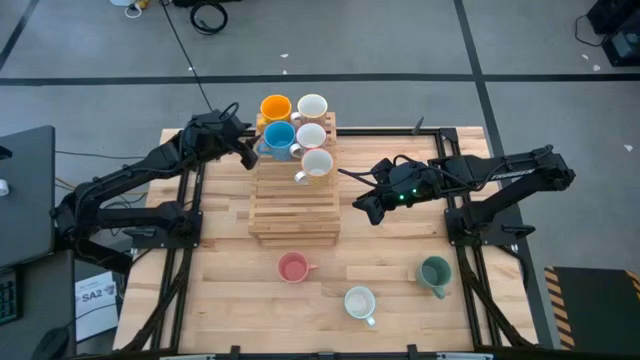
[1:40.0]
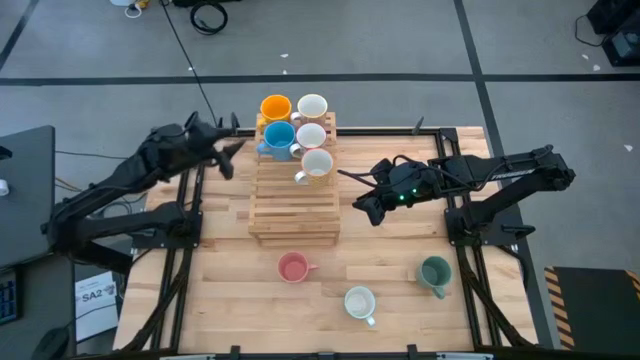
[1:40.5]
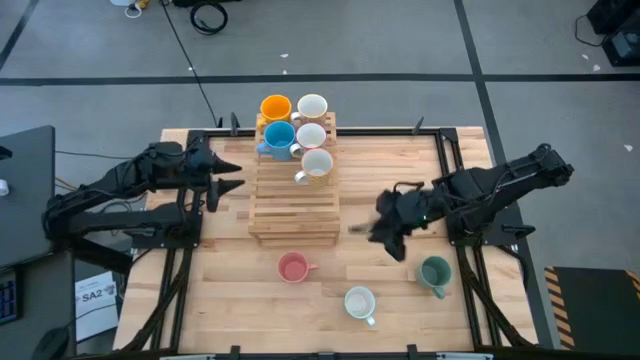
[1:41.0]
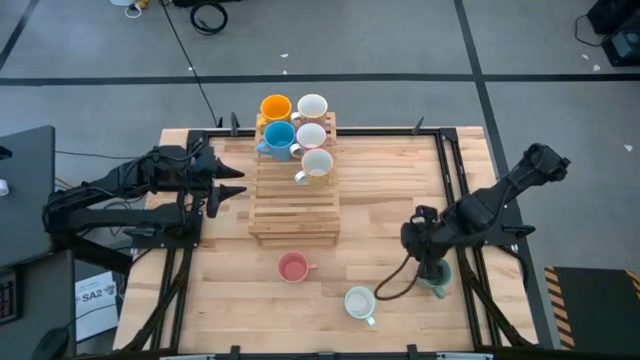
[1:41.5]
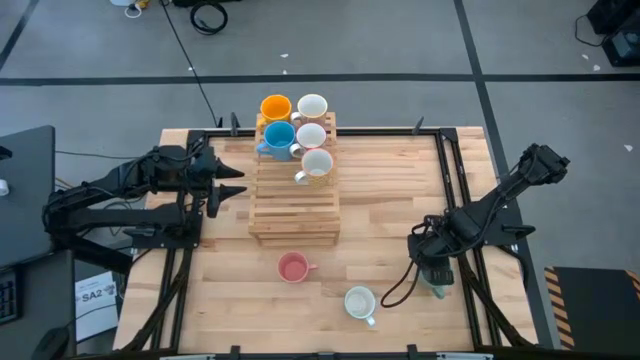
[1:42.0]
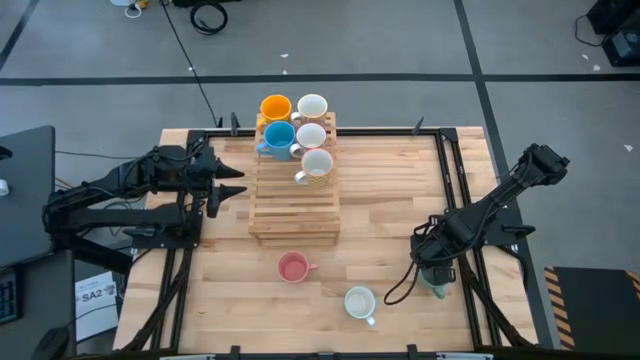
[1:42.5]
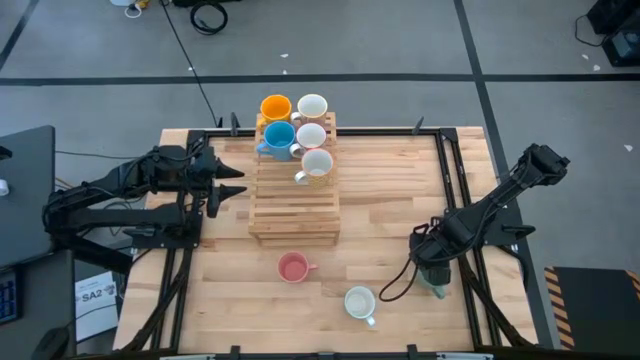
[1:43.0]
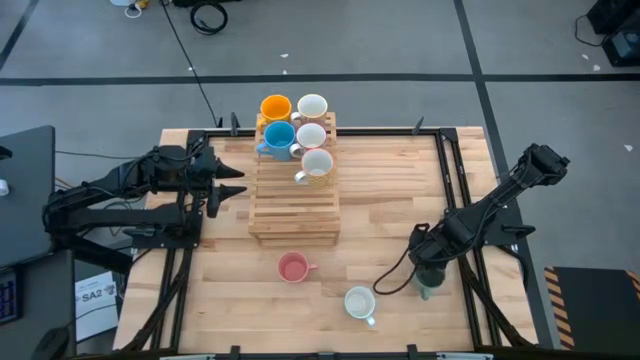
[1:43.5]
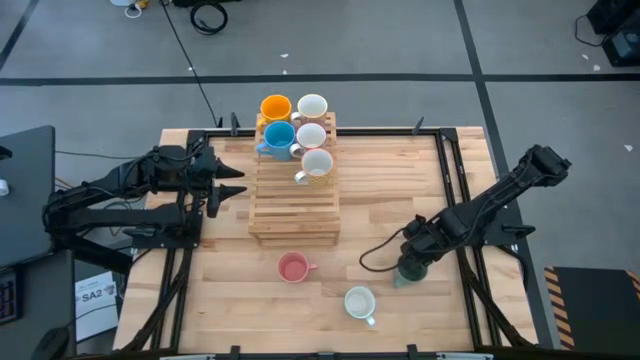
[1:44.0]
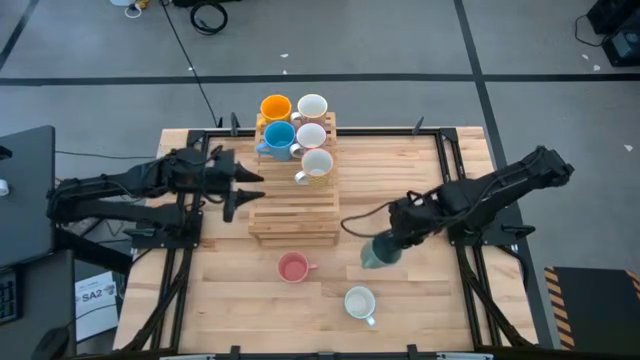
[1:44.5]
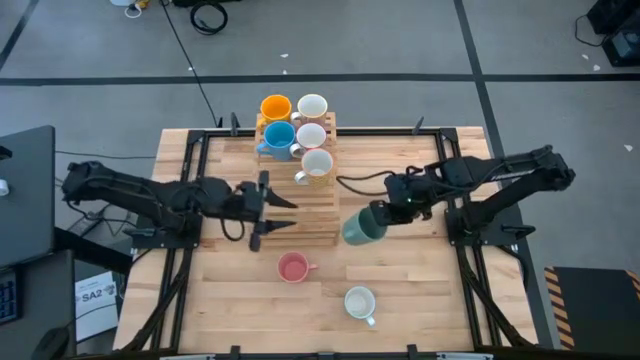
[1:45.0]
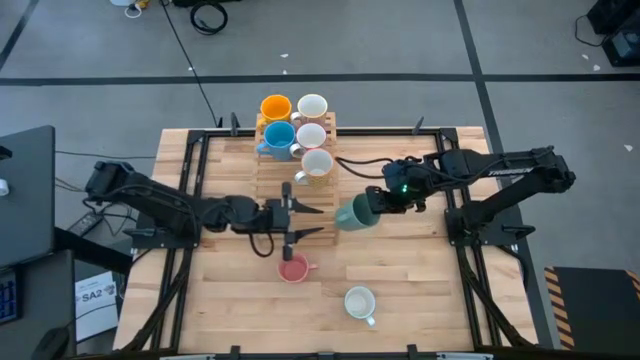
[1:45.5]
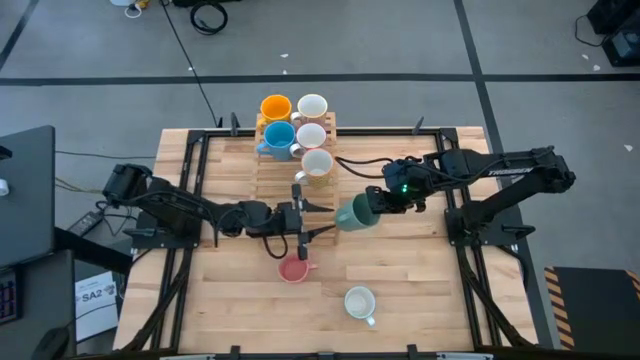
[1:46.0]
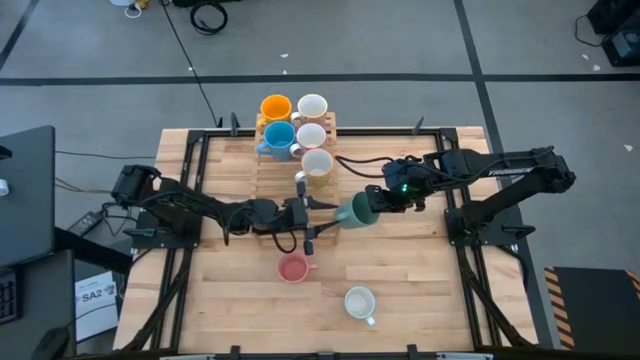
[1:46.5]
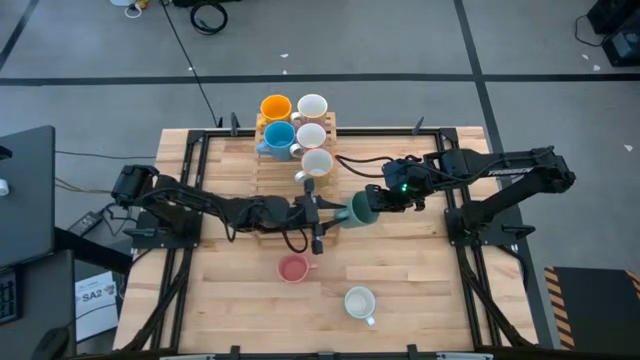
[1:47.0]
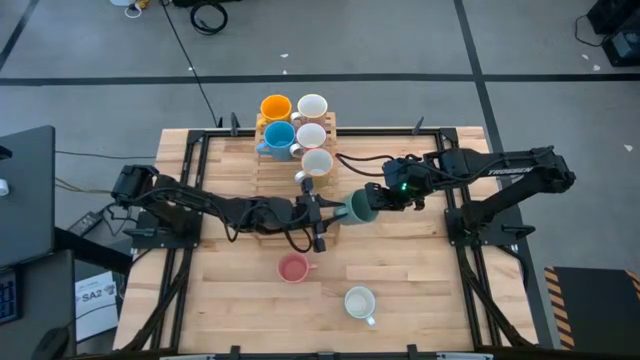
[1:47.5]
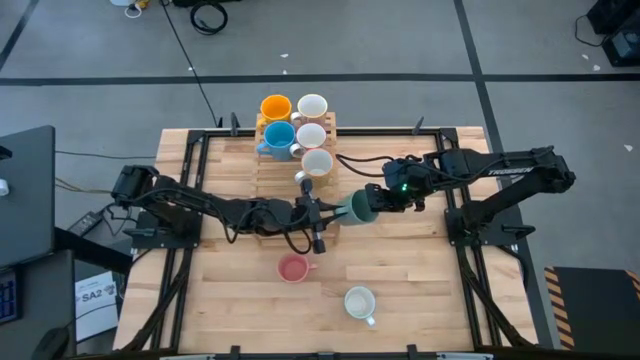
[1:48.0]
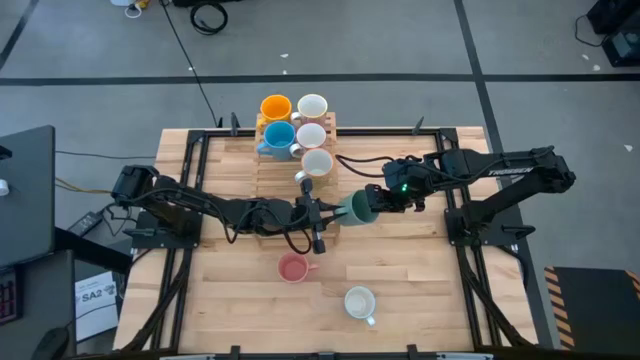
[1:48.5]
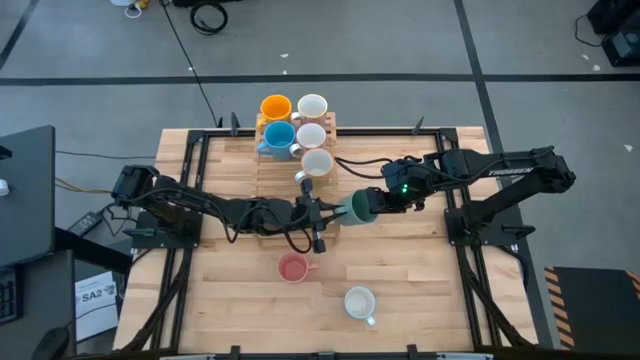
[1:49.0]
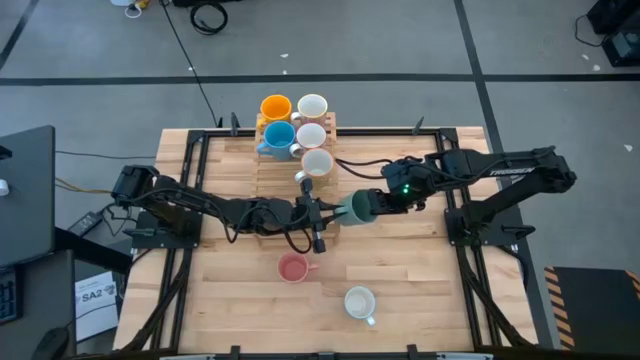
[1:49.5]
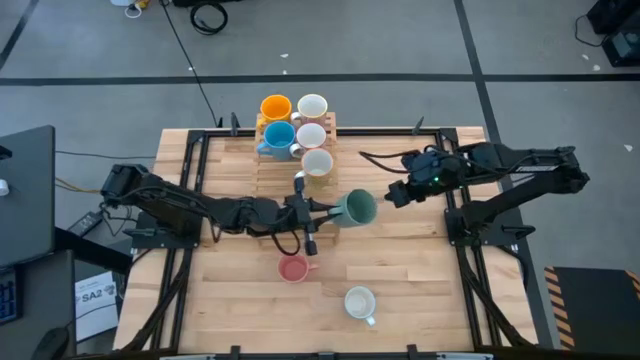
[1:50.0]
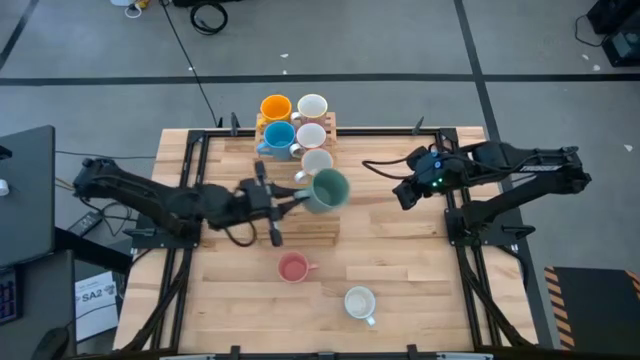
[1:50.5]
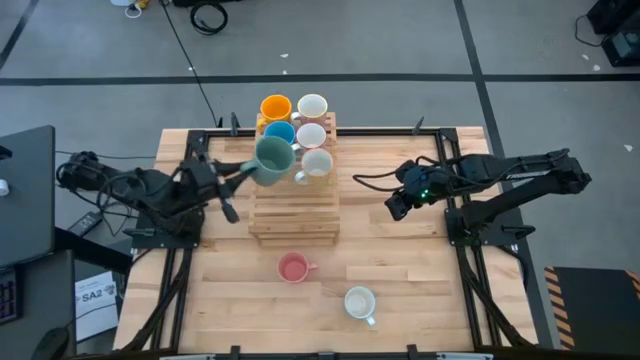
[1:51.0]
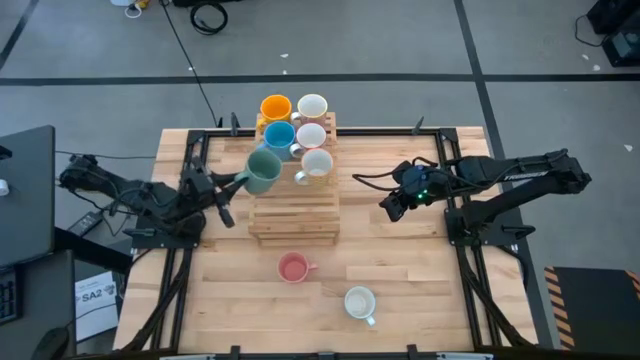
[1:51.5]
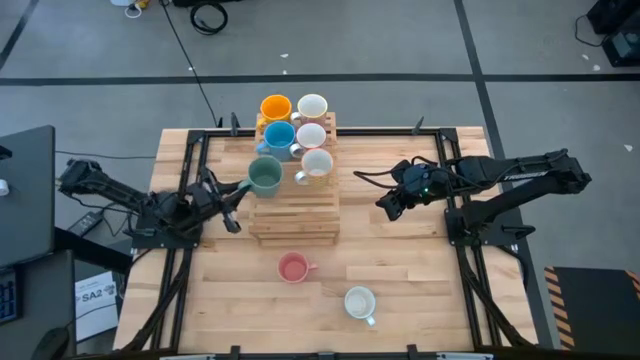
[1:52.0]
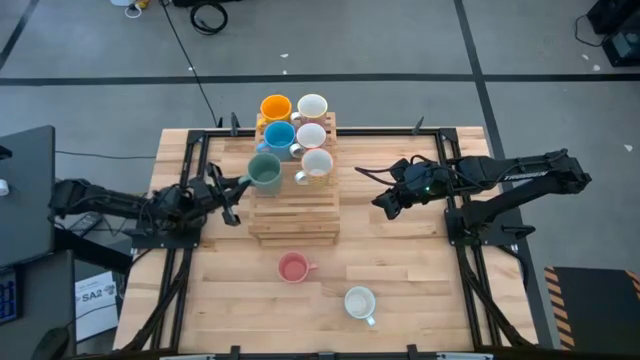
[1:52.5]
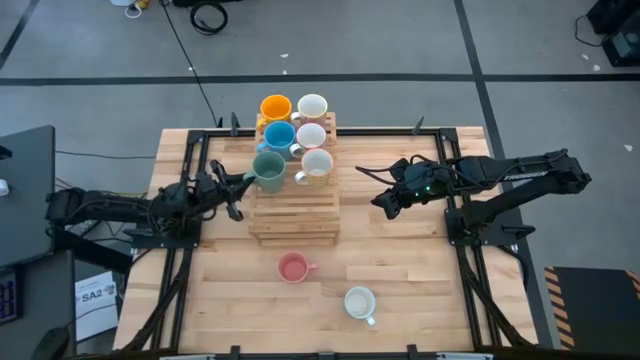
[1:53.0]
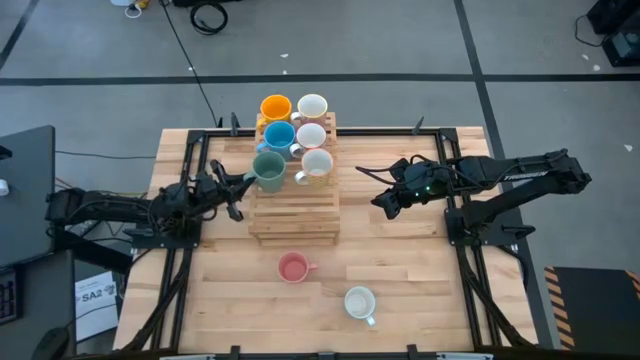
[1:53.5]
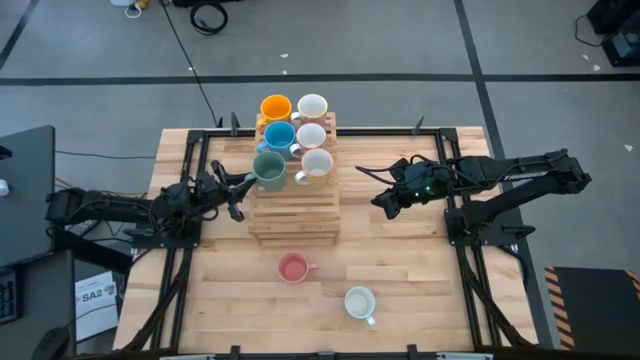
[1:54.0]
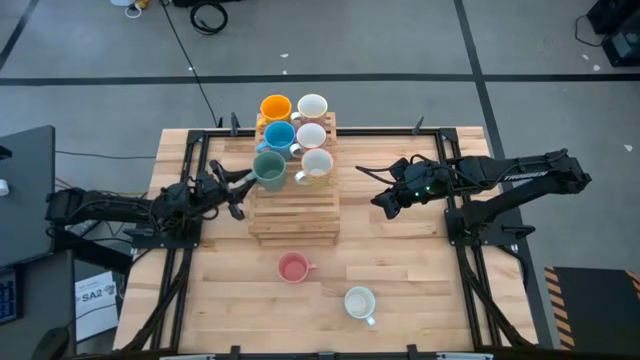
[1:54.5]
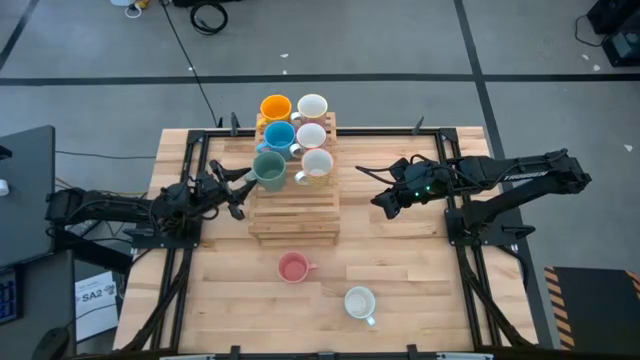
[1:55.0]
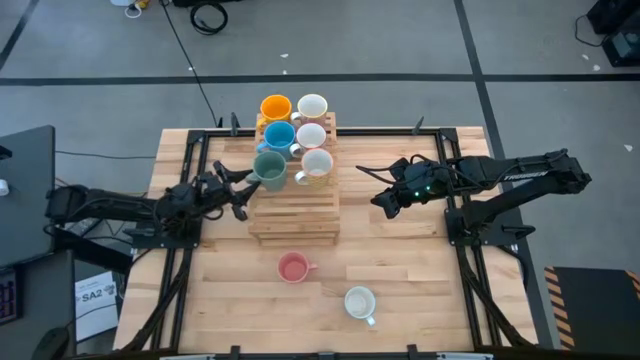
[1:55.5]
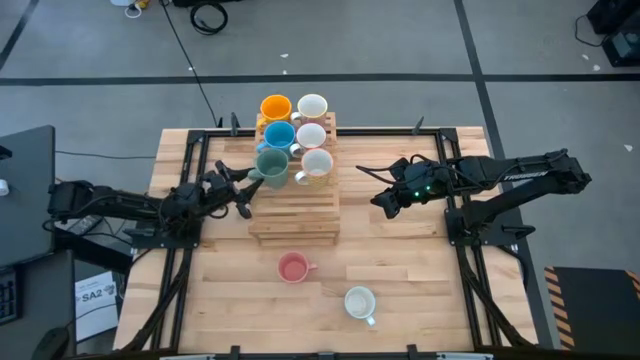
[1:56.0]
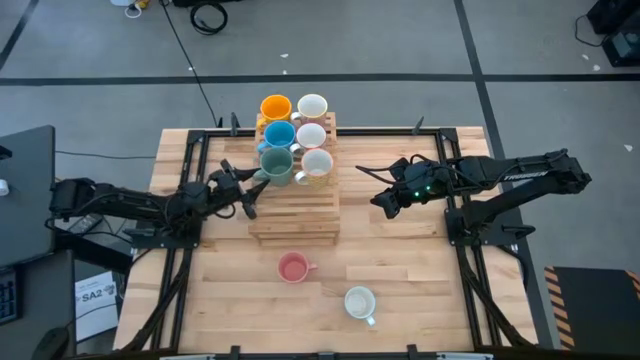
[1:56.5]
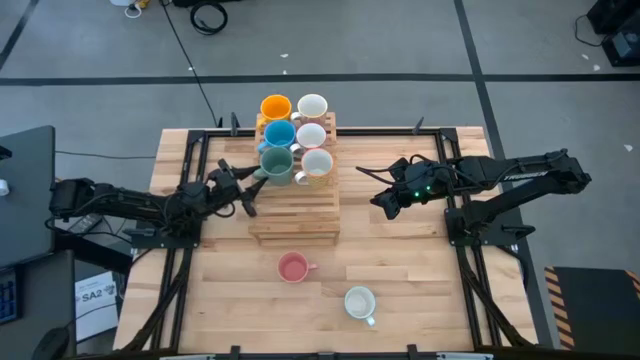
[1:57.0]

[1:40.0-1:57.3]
Task: Place coffee mugs
Put the green mug on the shelf

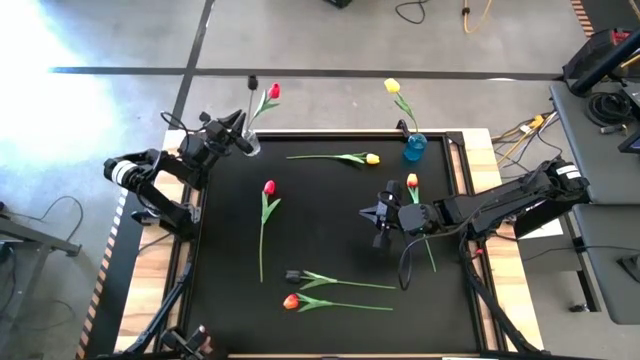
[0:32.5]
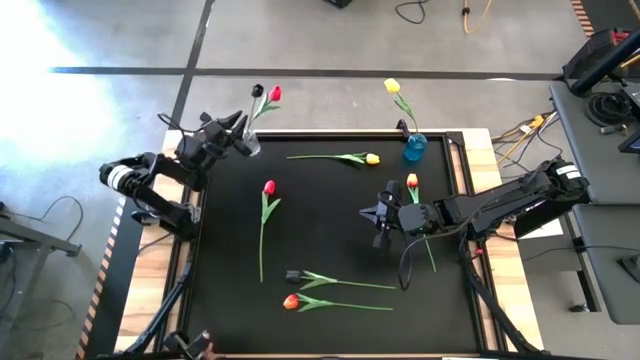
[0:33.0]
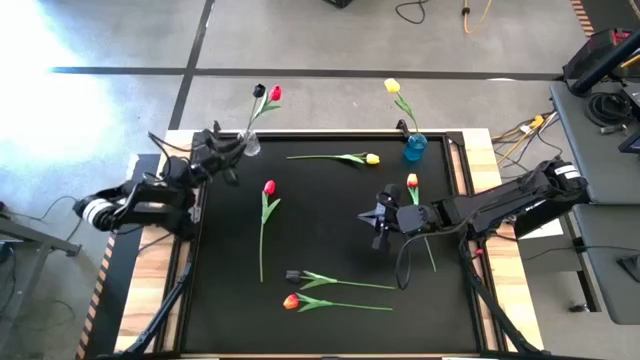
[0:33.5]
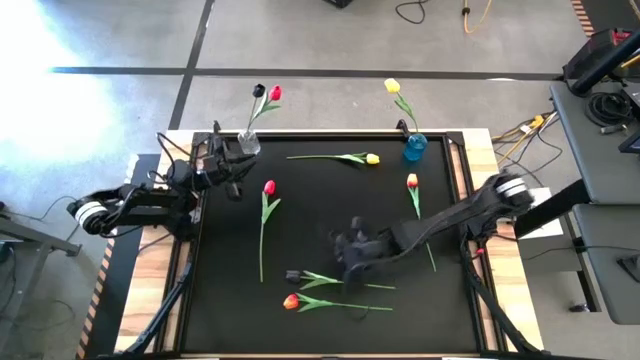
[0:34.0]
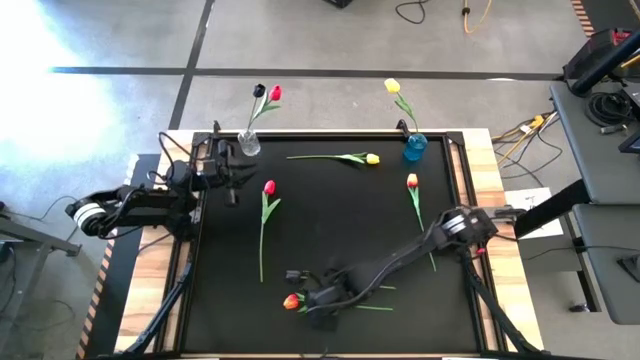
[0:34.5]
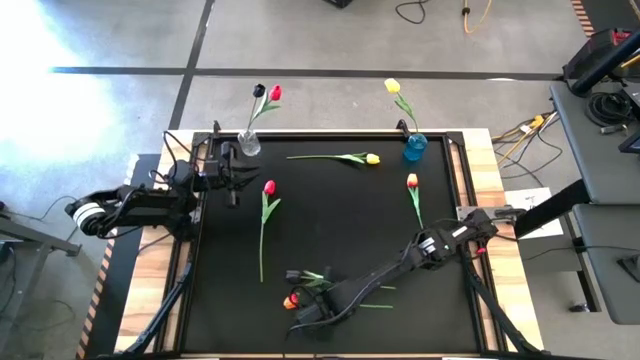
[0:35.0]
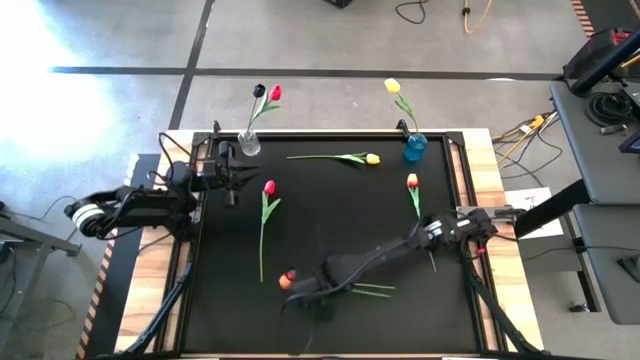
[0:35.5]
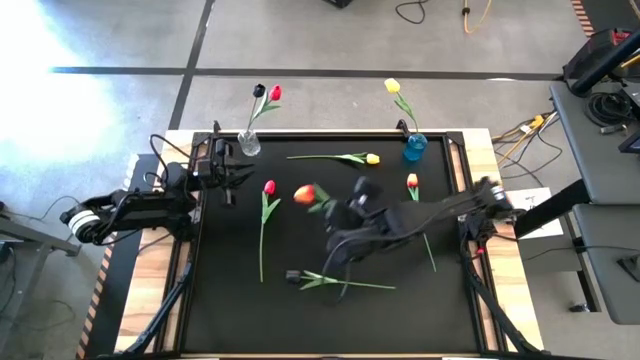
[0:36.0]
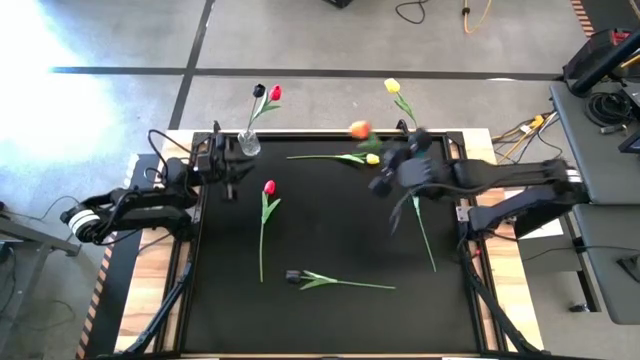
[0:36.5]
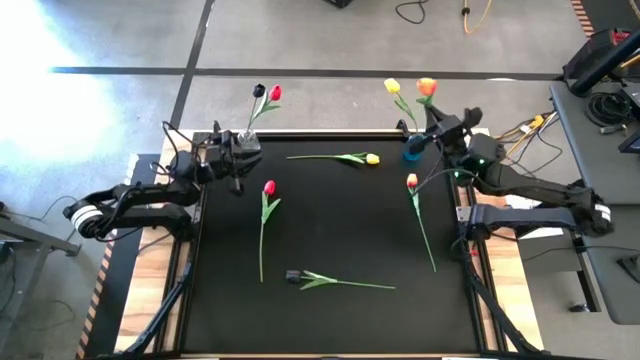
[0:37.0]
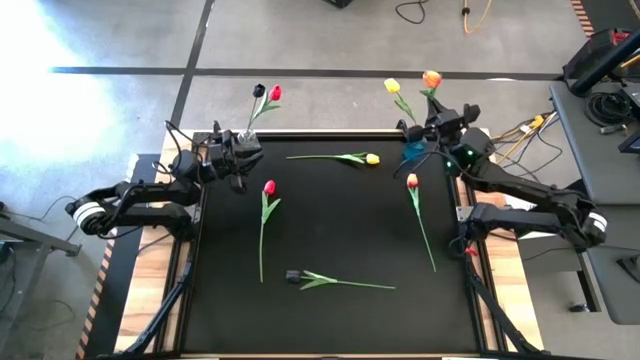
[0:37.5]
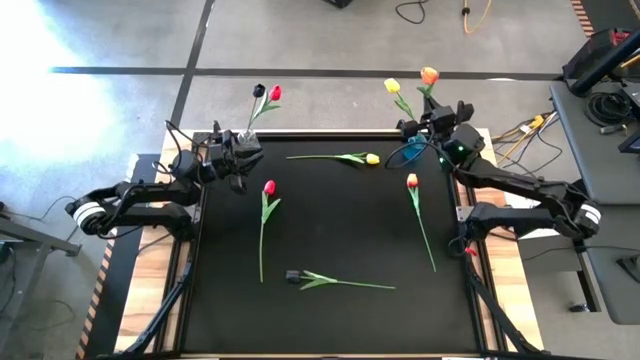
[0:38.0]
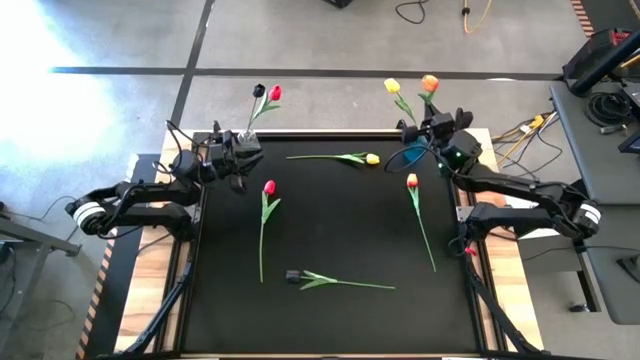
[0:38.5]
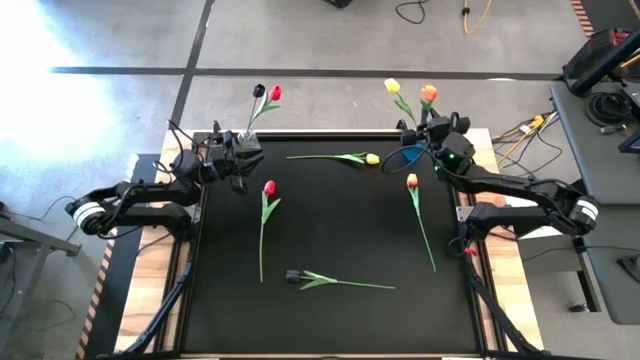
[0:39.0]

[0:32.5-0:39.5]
Task: Sort flowers into vase by color
Put the bottom orange tulip into the blue flower vase
